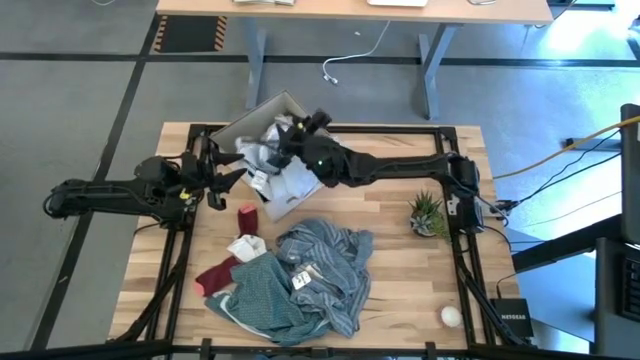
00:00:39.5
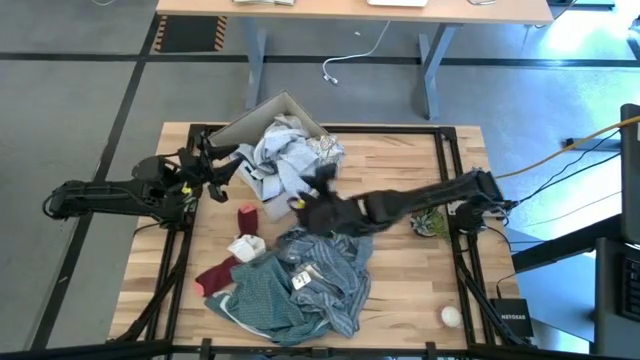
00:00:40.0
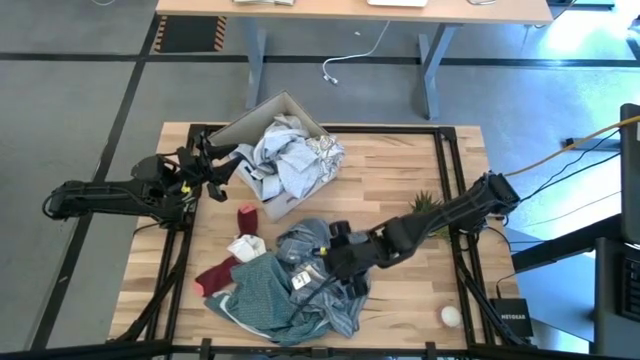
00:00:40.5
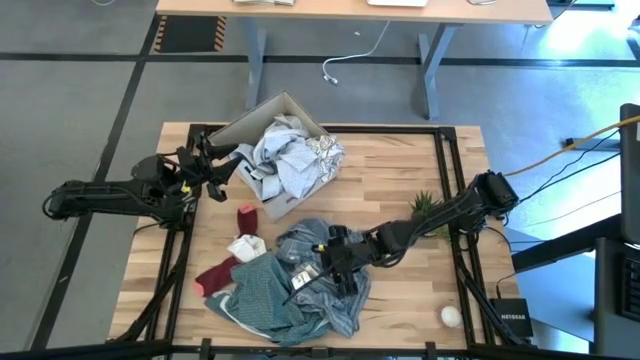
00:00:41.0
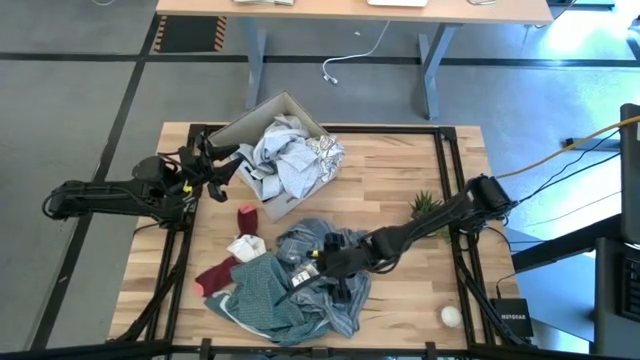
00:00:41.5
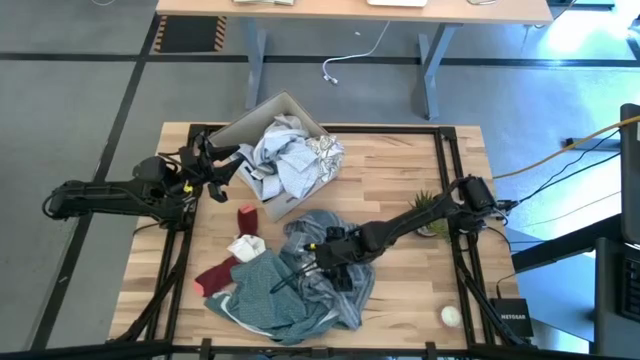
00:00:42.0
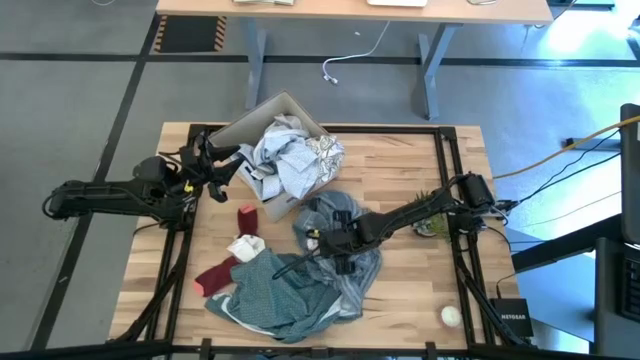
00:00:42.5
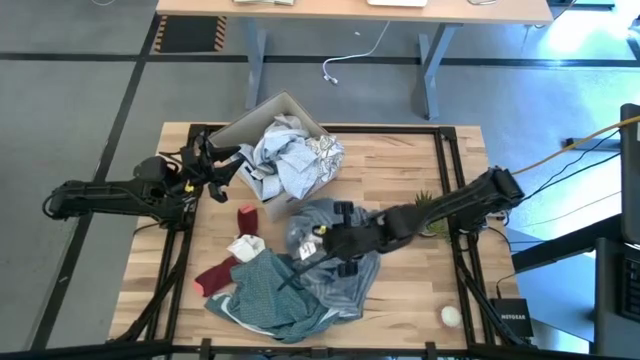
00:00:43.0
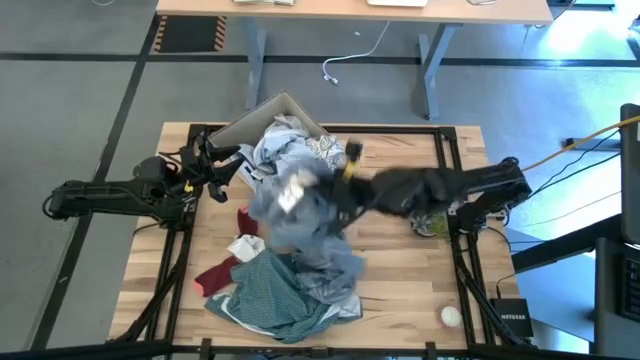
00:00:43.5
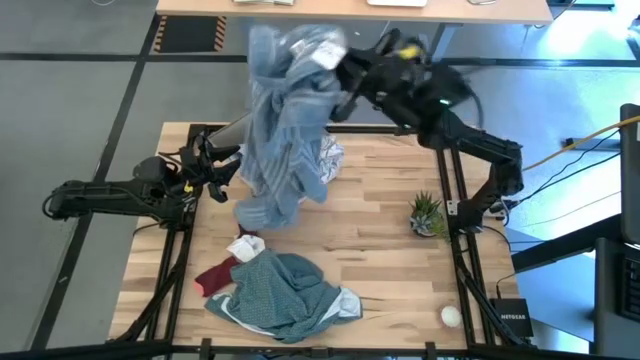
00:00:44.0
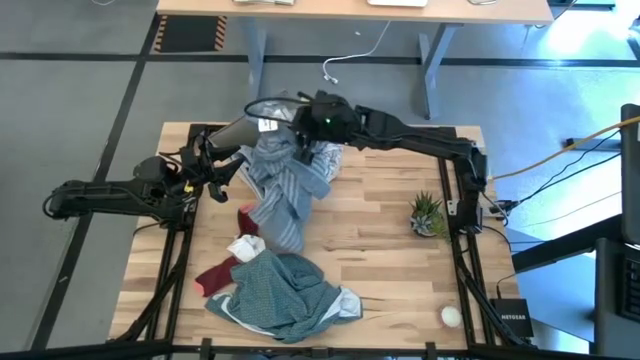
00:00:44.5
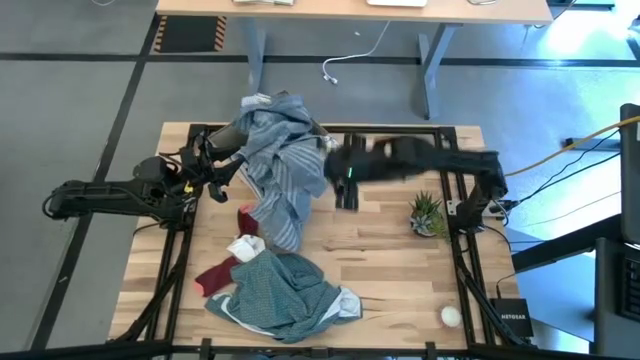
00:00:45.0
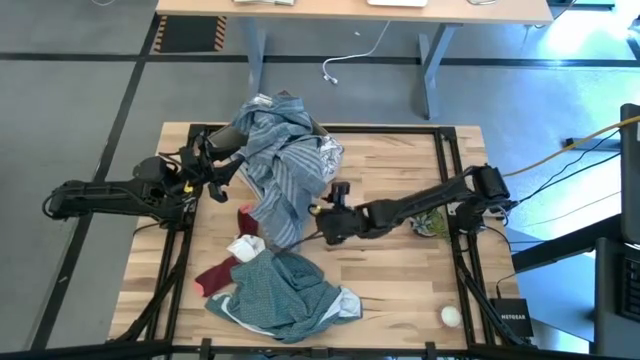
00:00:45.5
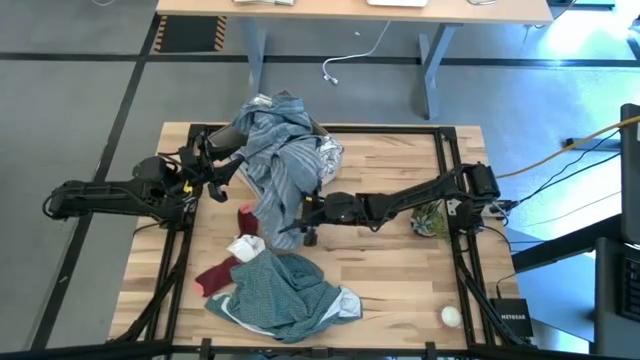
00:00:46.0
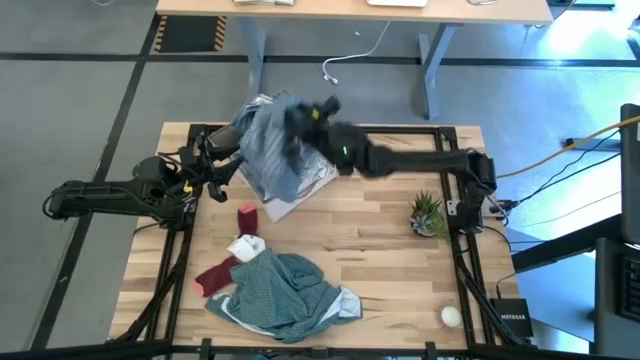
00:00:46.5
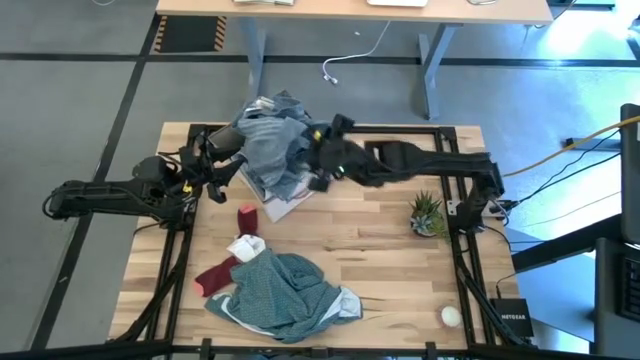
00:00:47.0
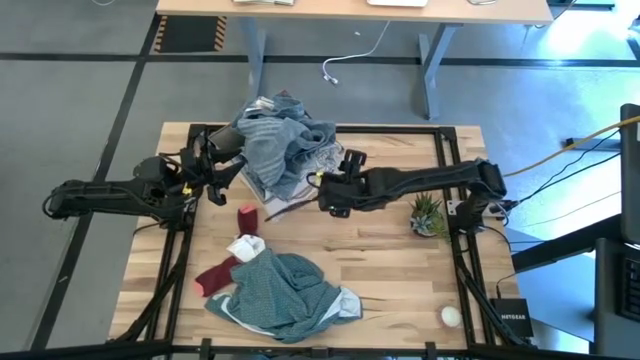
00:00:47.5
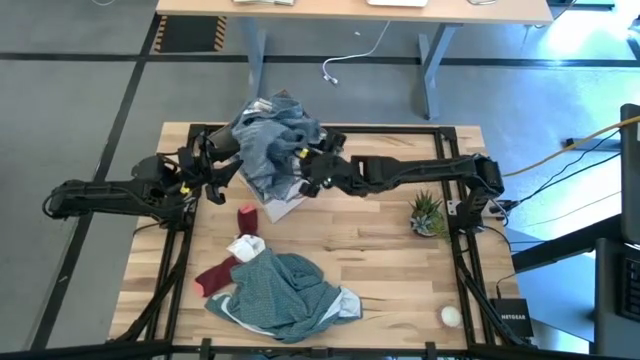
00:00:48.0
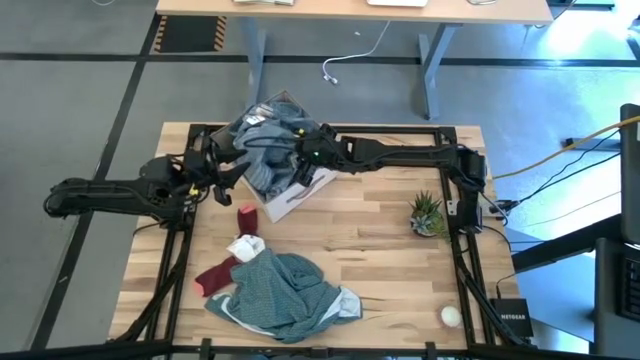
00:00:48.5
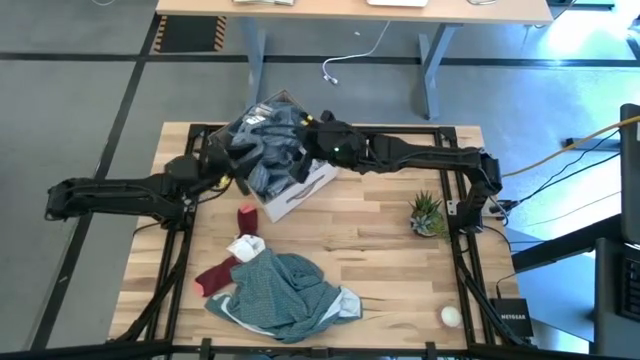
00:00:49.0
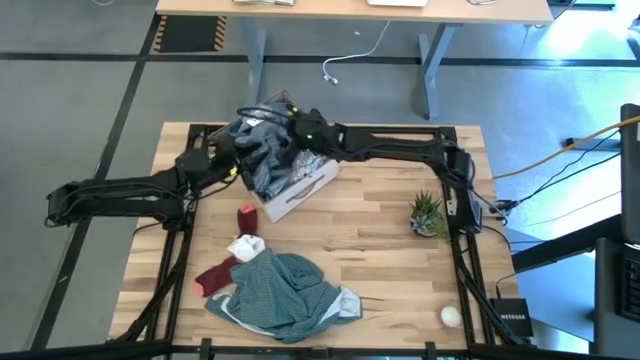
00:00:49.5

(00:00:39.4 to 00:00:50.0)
Task: Sort clothes
Put the blue striped shirt into the laundry organizer

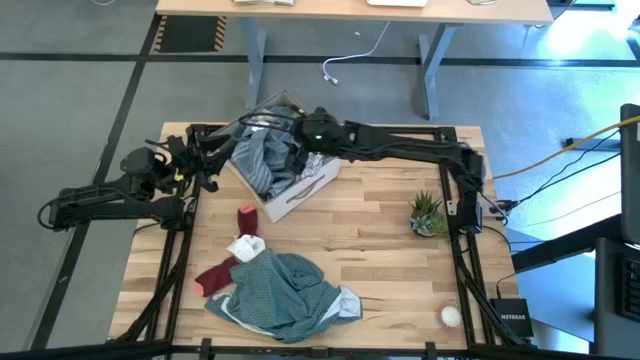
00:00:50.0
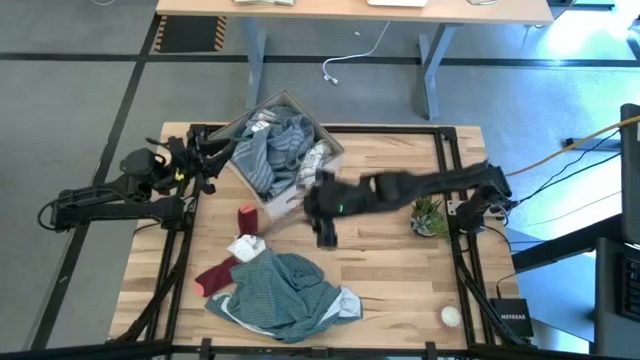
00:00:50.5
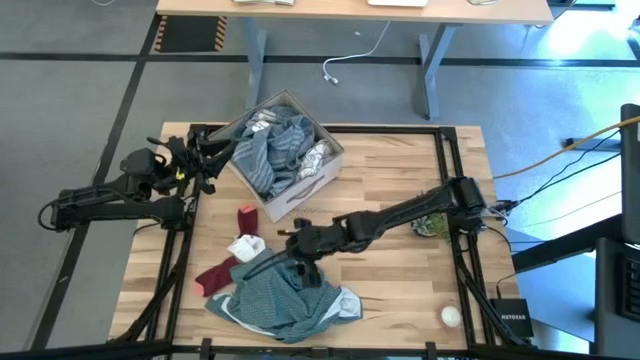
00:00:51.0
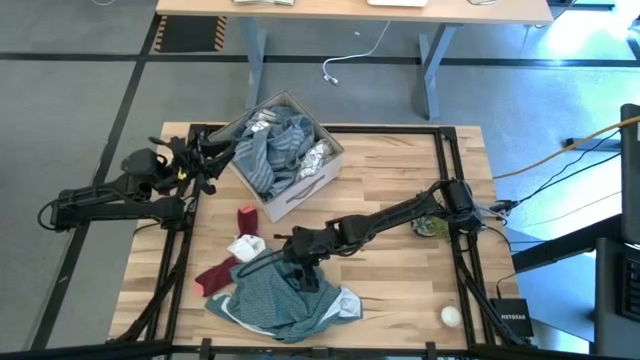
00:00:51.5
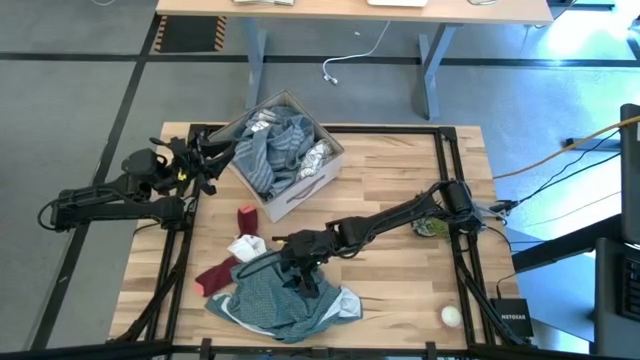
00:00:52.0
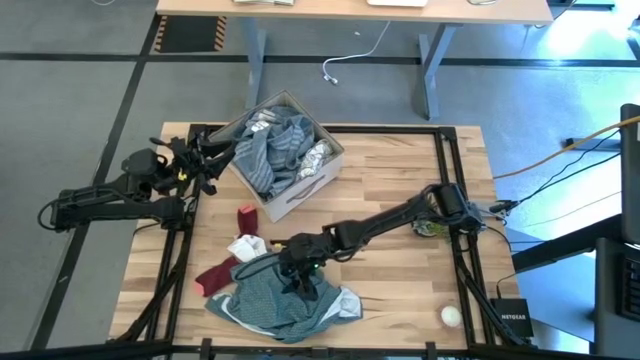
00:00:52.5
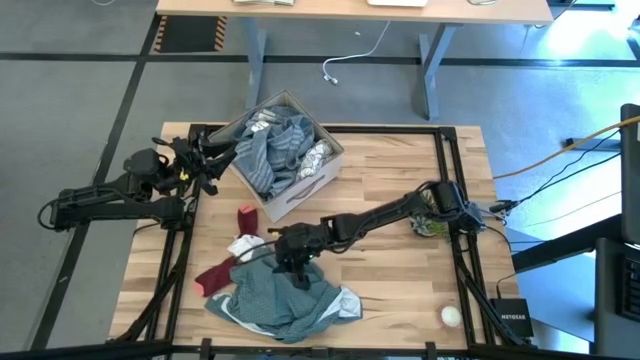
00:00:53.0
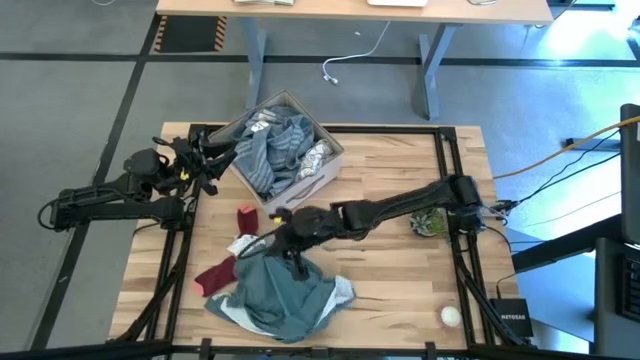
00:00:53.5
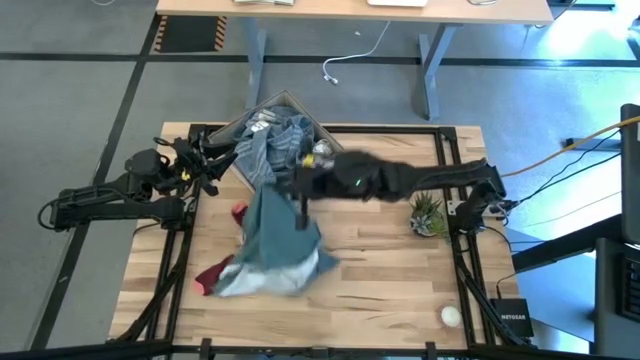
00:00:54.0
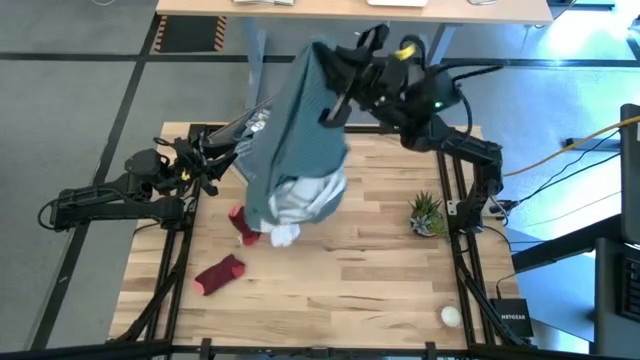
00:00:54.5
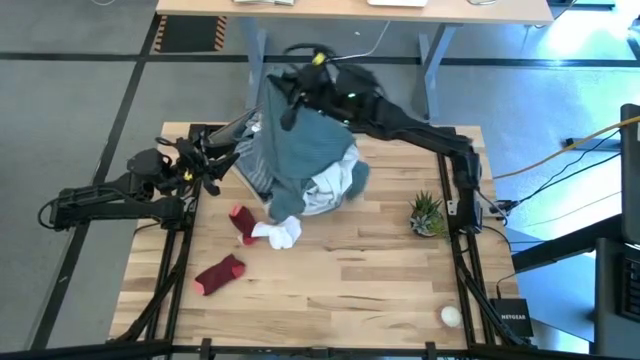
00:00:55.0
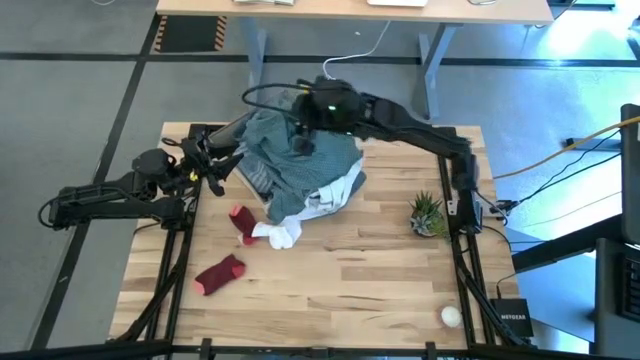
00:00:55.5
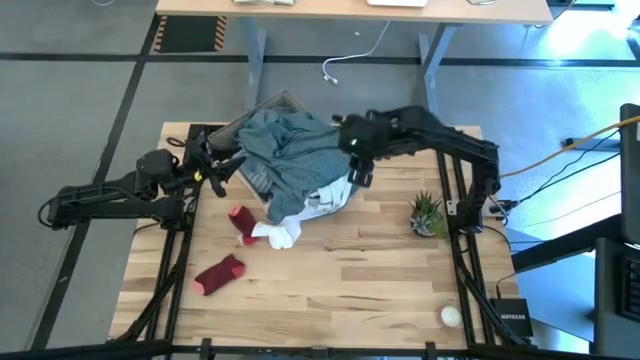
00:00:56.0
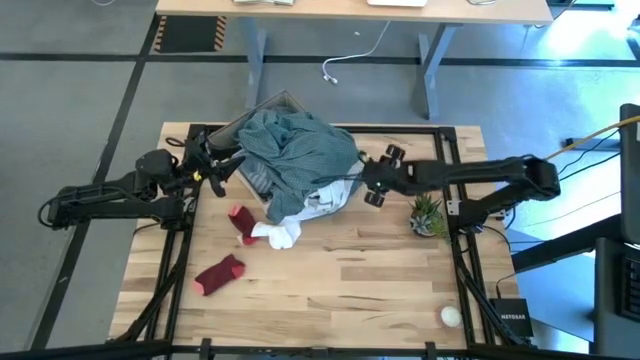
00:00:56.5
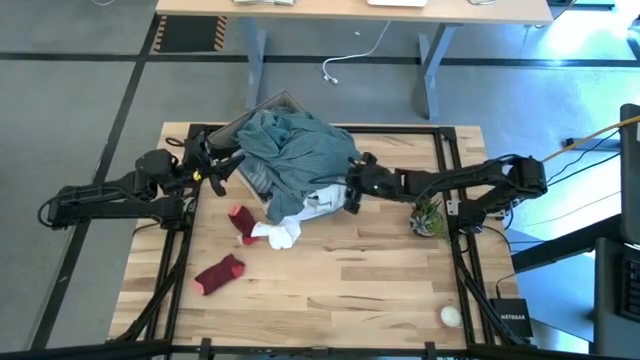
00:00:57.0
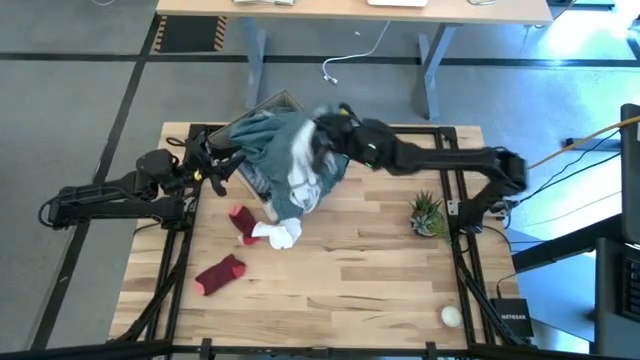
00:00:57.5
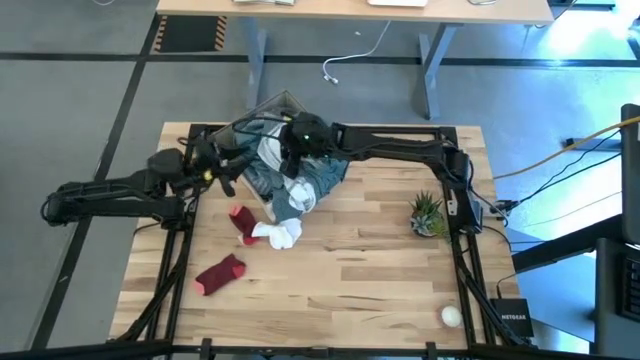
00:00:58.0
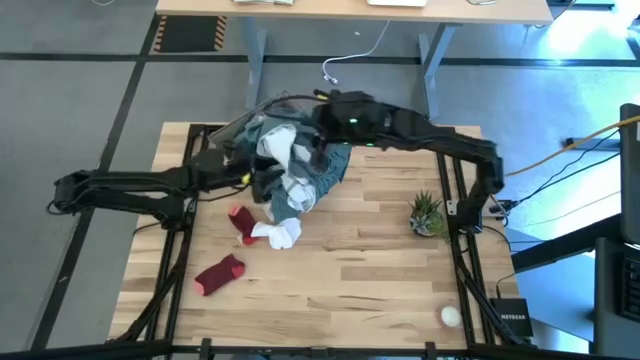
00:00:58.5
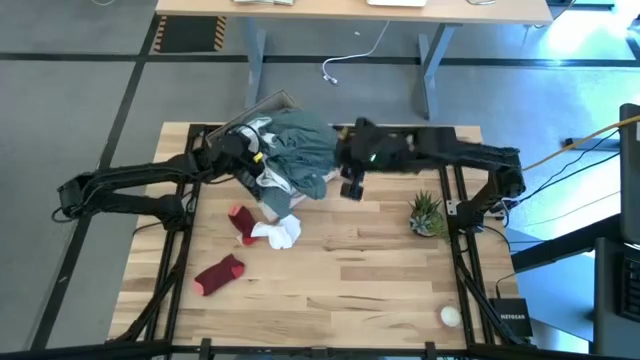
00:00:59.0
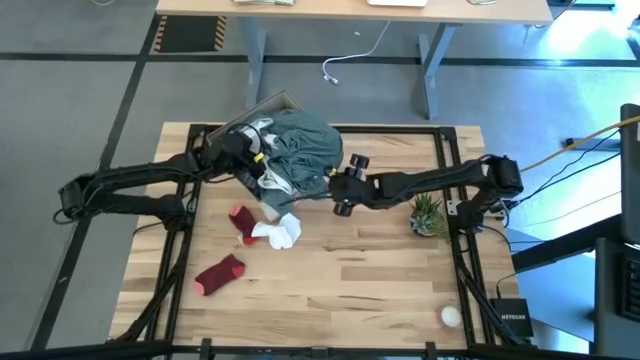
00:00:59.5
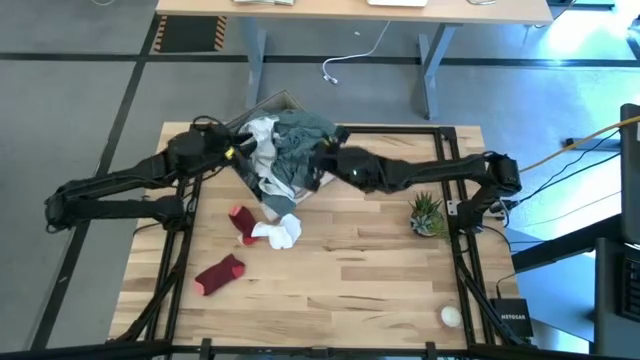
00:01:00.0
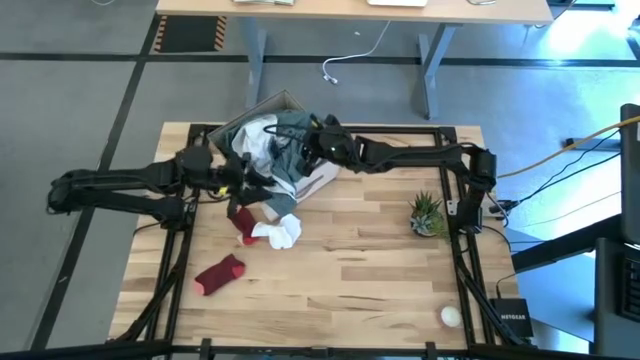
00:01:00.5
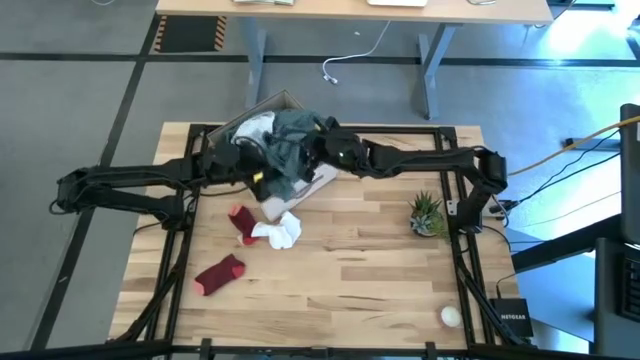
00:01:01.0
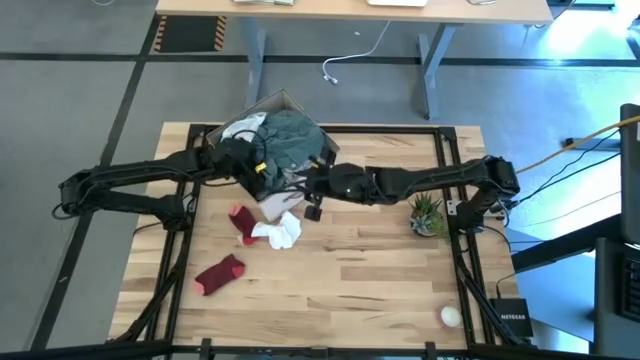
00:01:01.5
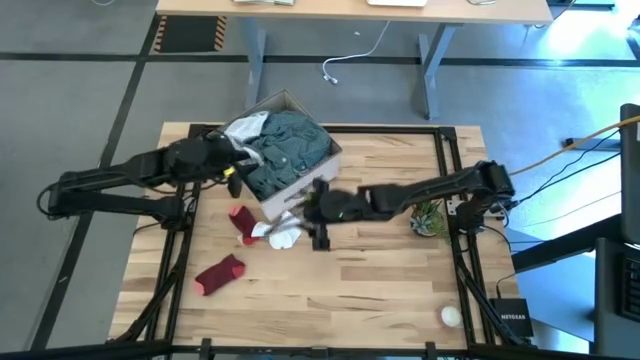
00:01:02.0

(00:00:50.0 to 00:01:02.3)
Put the green patterned shirt into the laundry organizer
